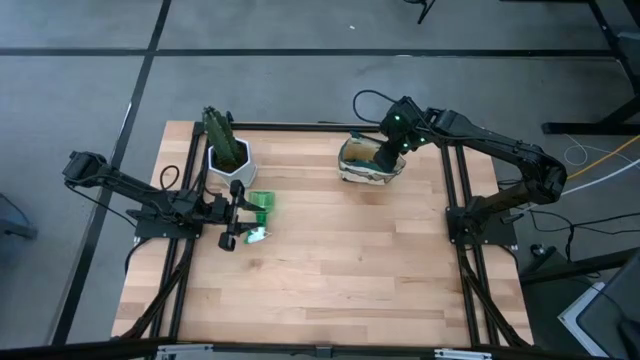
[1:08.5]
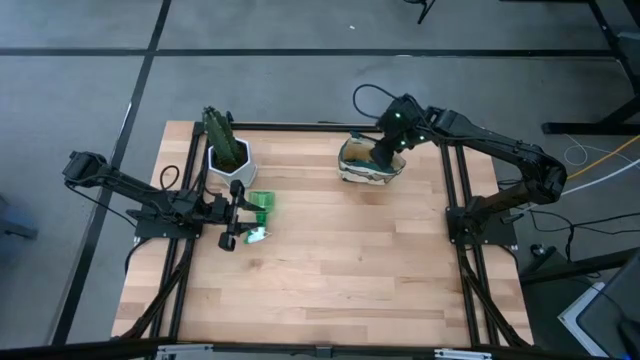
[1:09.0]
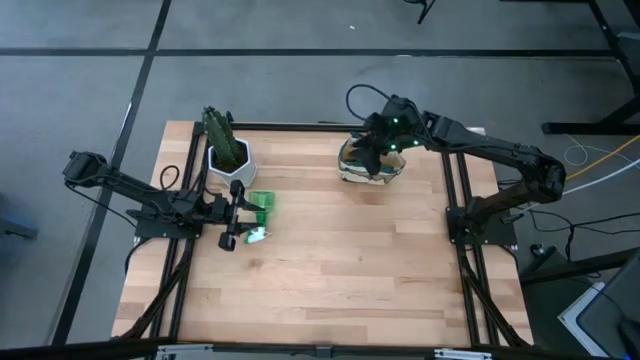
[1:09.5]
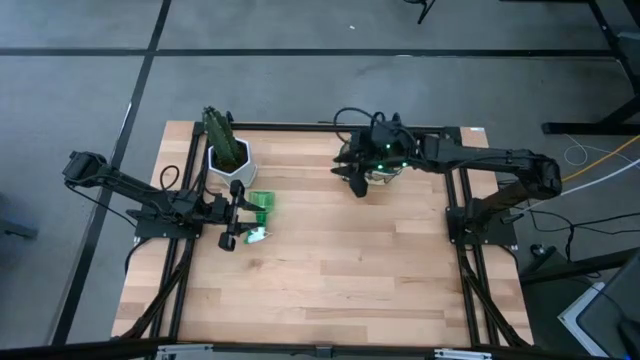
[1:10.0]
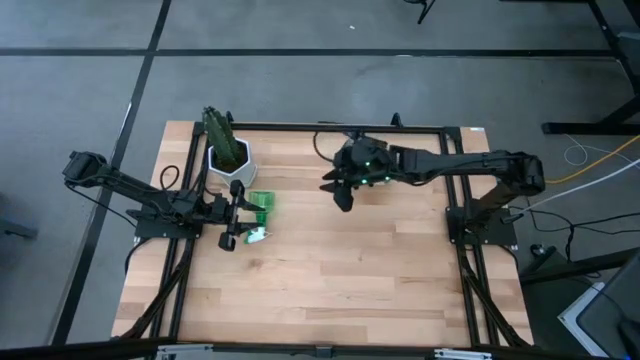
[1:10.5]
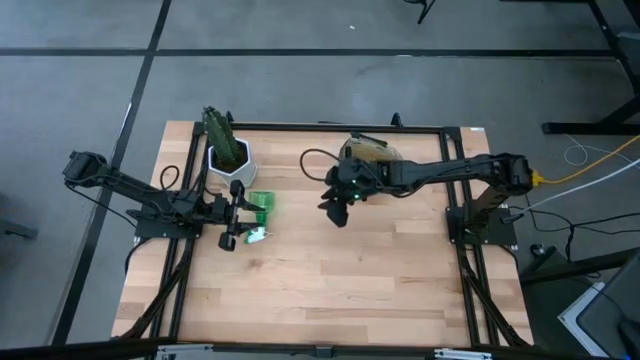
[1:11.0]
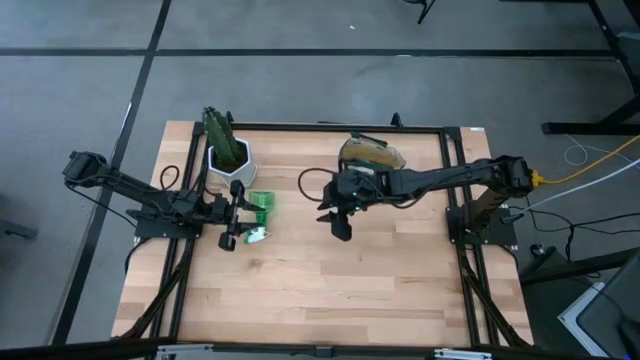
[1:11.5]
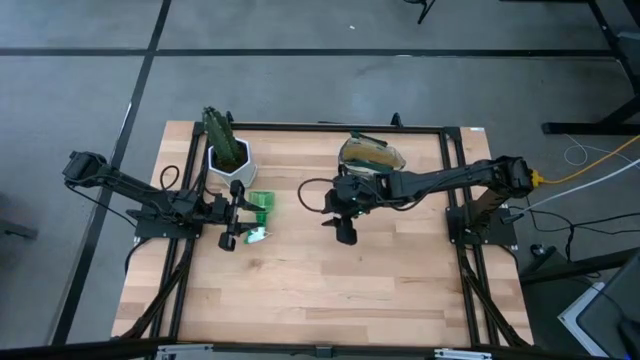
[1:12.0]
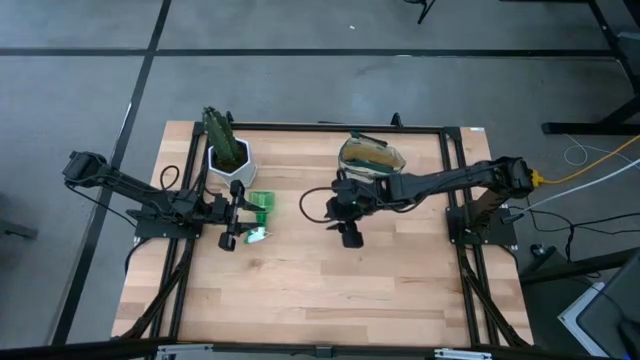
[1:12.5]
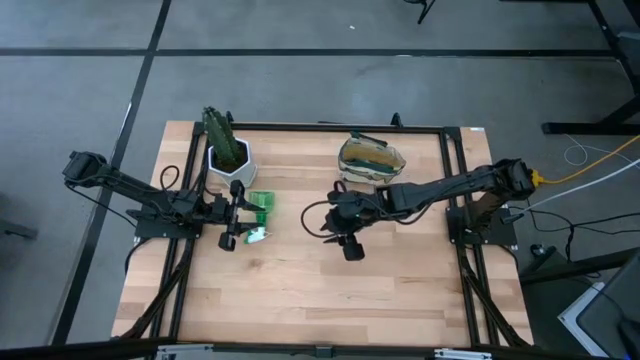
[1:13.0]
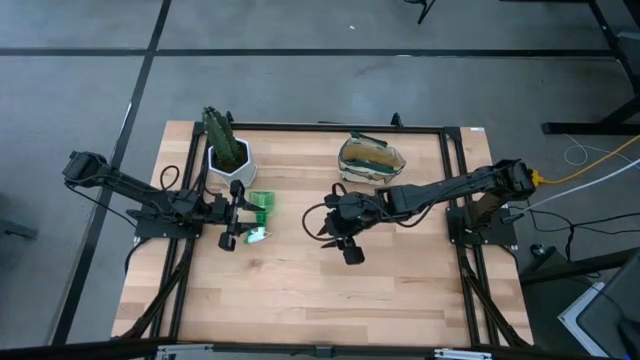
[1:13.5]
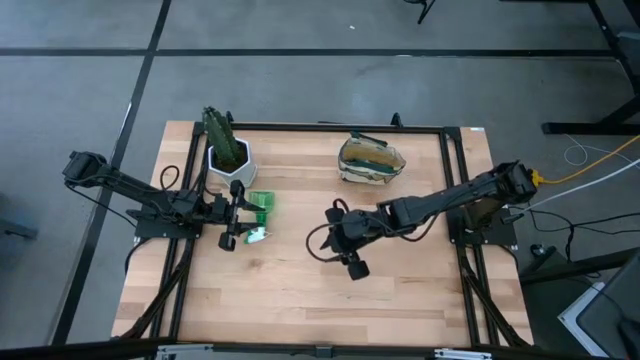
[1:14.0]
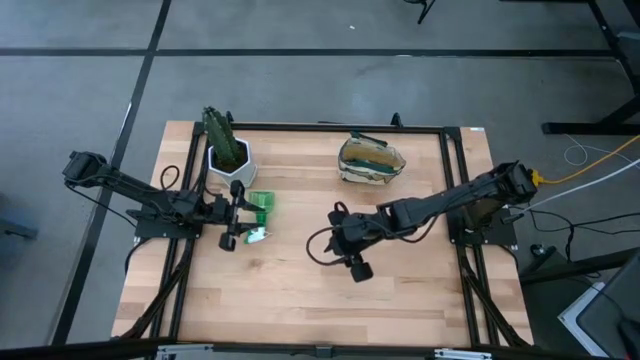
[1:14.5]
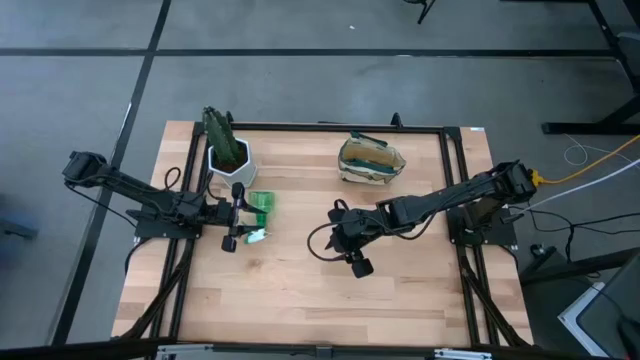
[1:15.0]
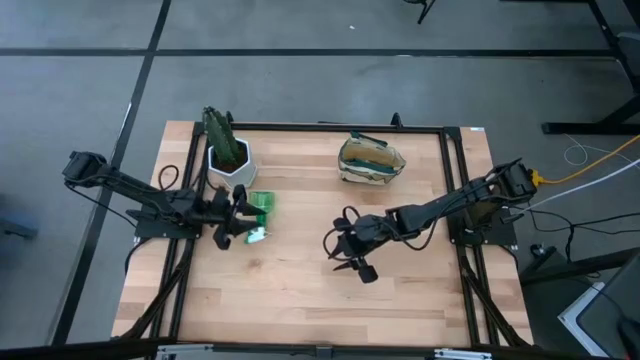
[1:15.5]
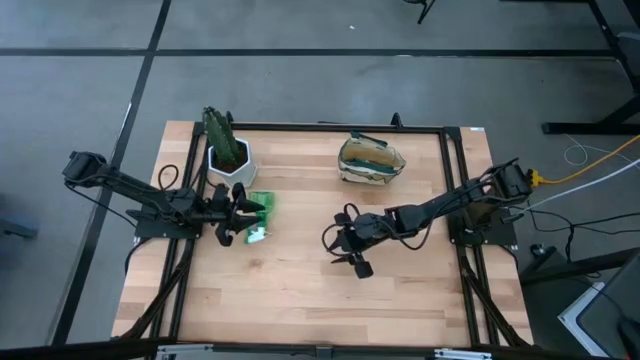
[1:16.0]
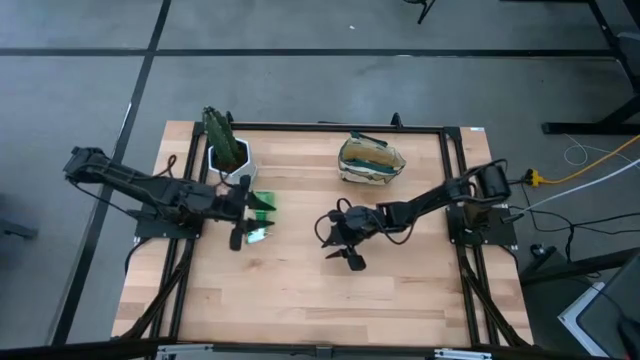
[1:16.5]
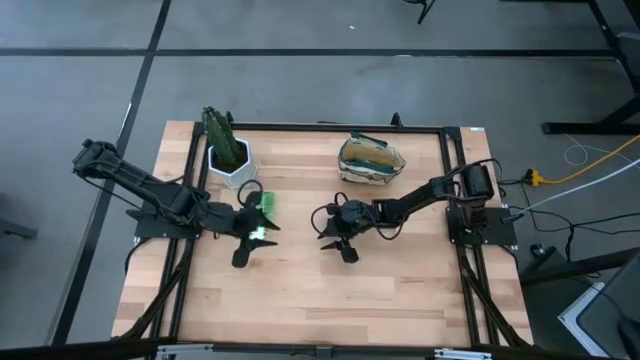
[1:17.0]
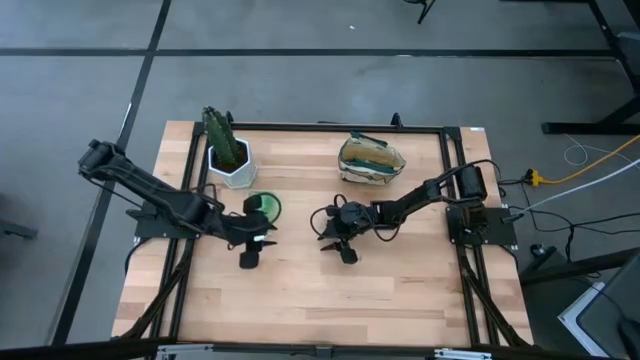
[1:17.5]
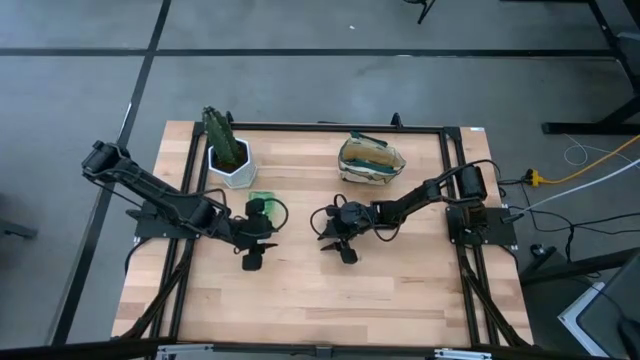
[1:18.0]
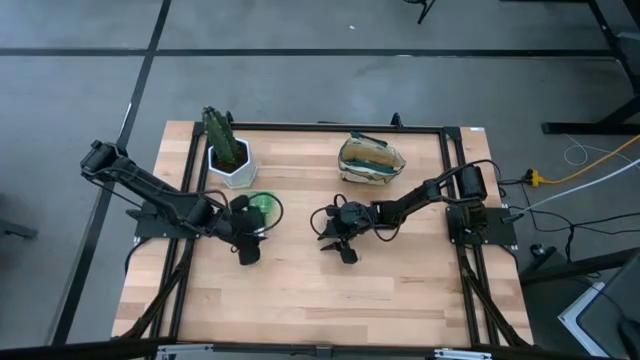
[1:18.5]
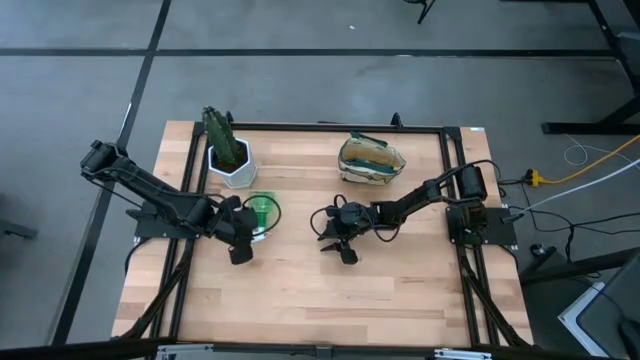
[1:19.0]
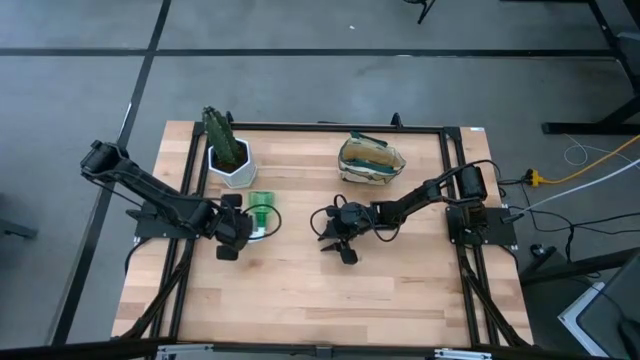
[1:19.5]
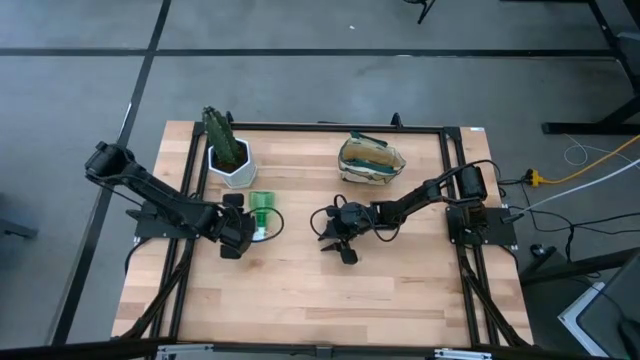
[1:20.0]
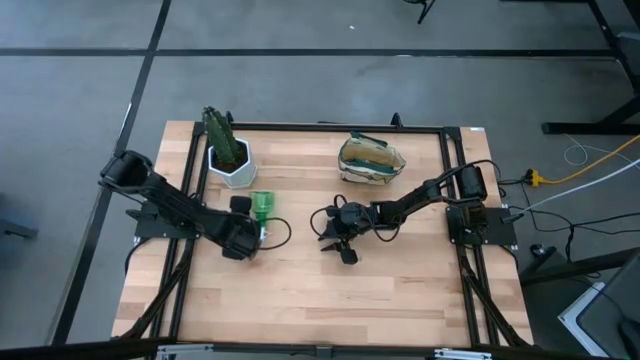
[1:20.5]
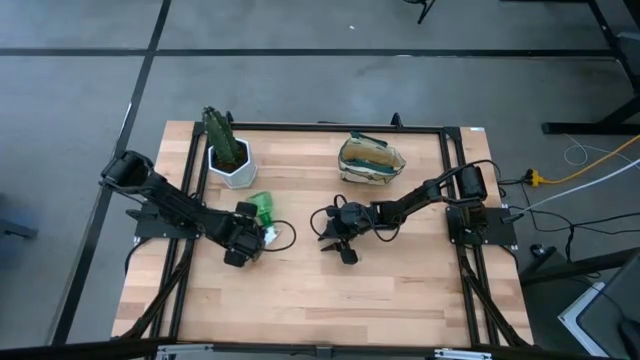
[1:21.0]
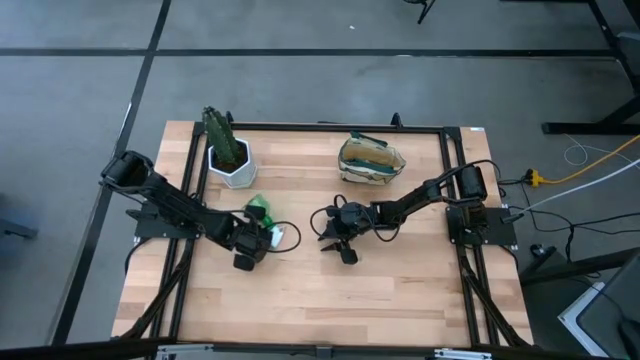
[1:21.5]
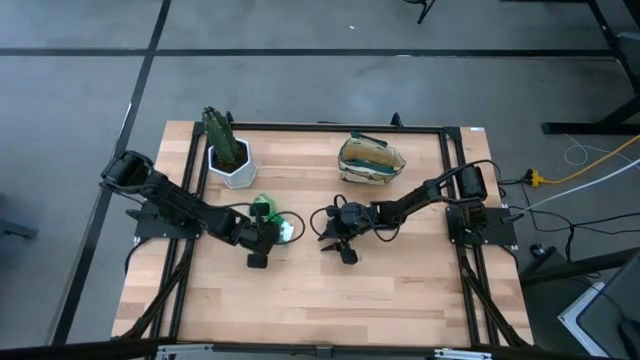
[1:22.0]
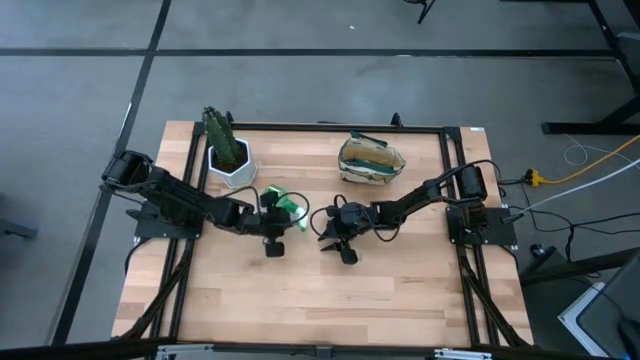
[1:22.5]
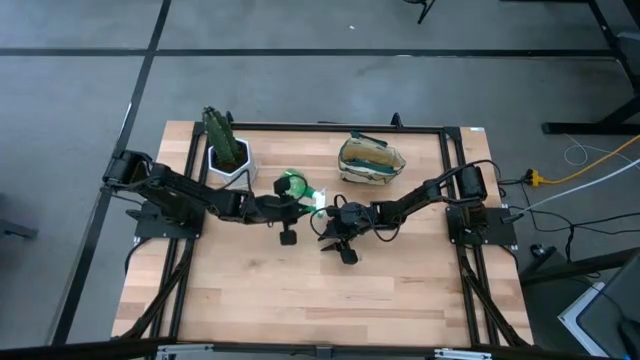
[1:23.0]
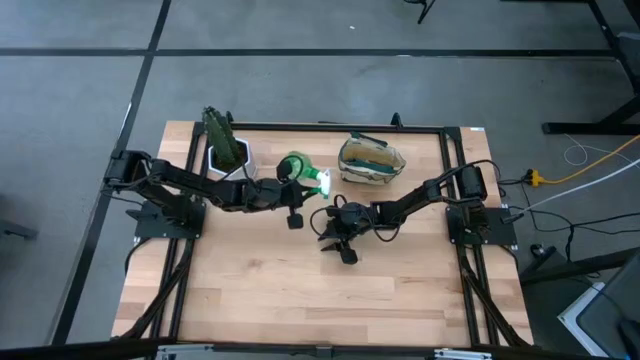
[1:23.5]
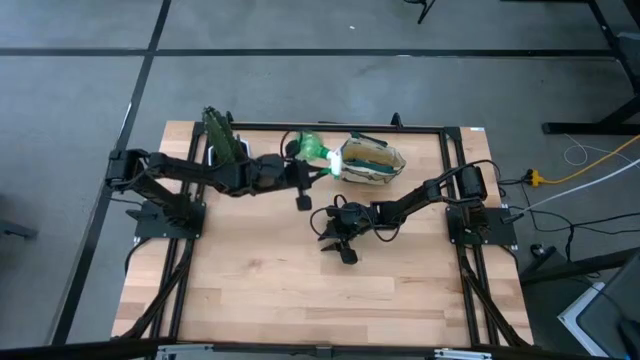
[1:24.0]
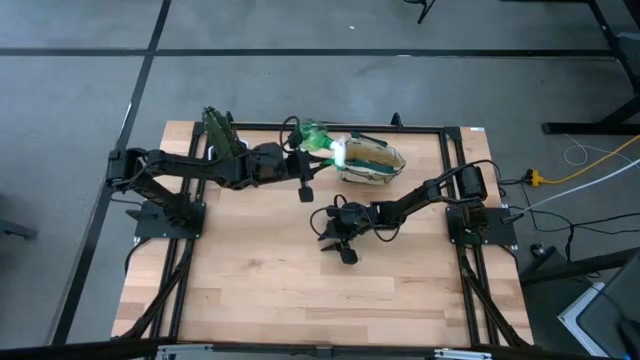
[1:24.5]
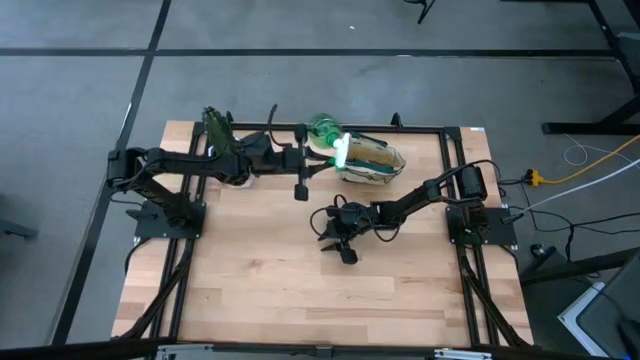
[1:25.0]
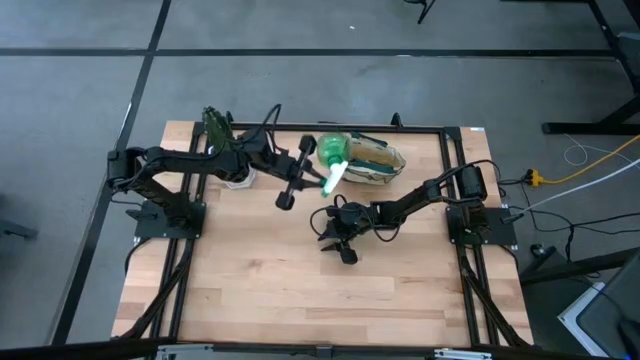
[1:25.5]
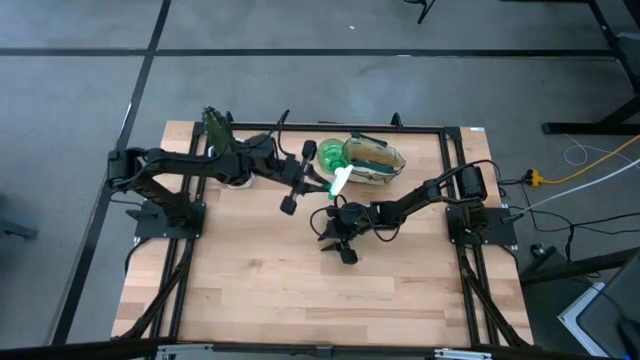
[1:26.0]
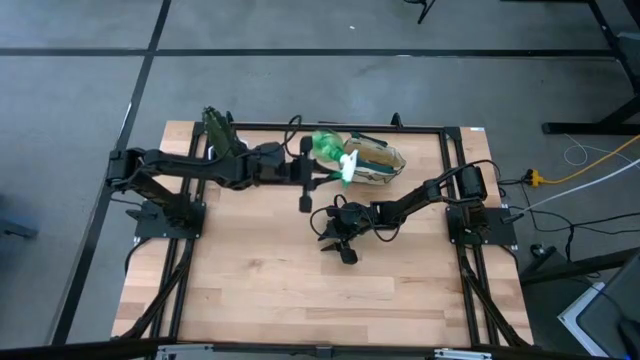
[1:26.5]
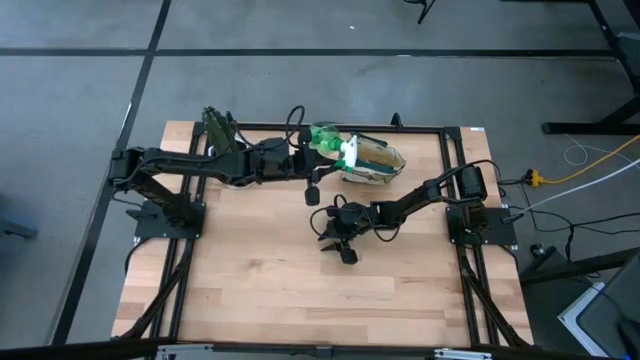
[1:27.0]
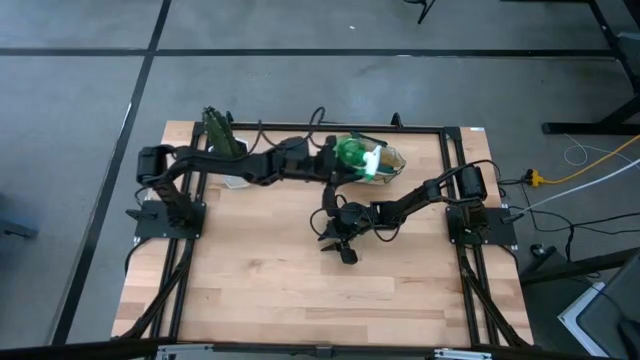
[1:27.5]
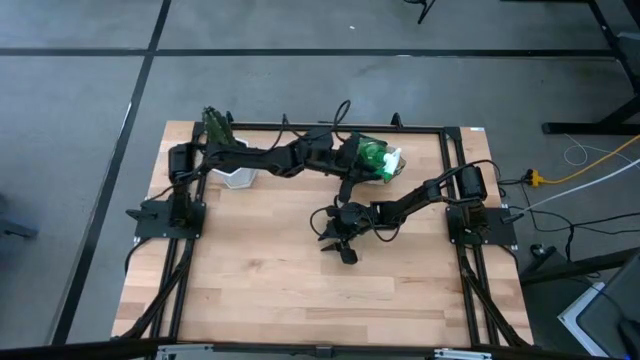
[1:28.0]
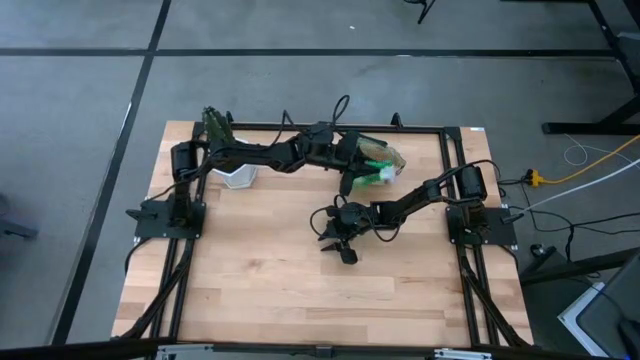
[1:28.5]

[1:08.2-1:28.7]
Task: Pick & Place Garden tools in Gardening bag
Put the green spray bottle into the brown gardening bag

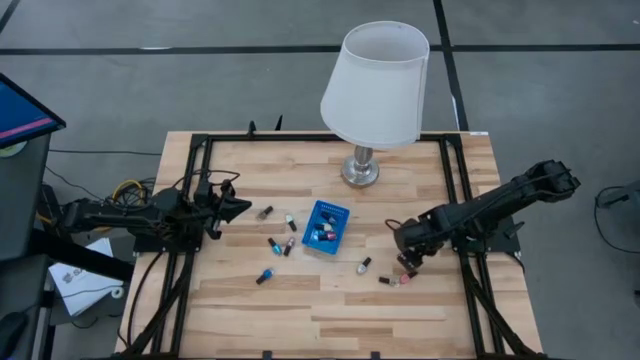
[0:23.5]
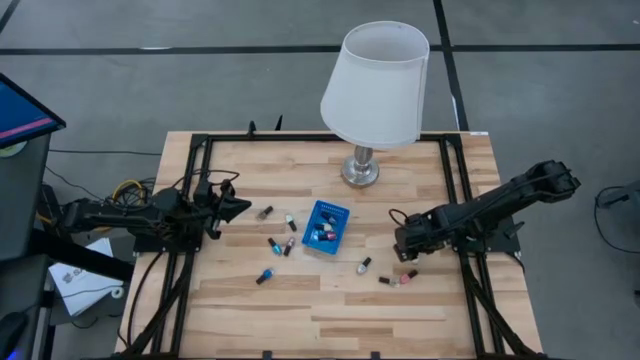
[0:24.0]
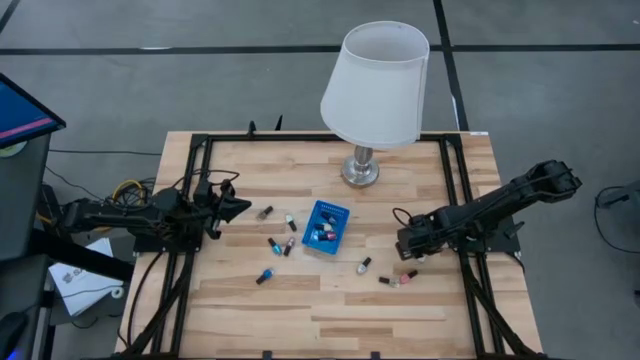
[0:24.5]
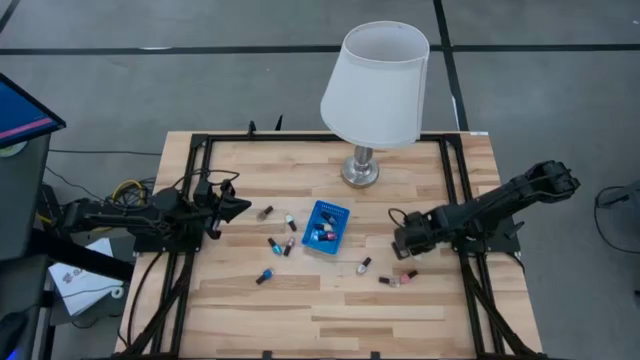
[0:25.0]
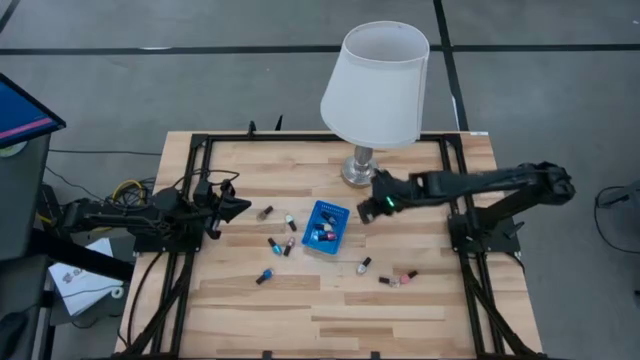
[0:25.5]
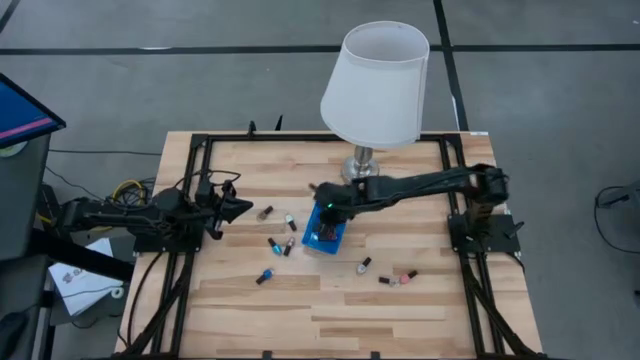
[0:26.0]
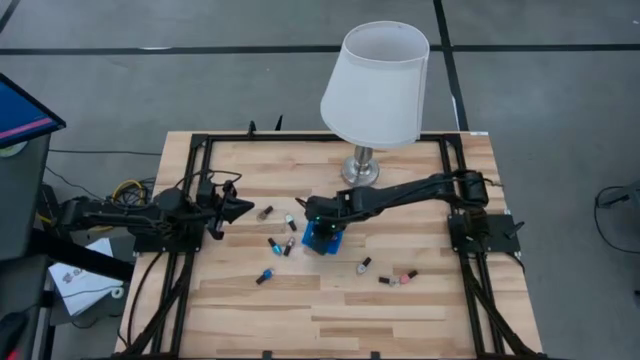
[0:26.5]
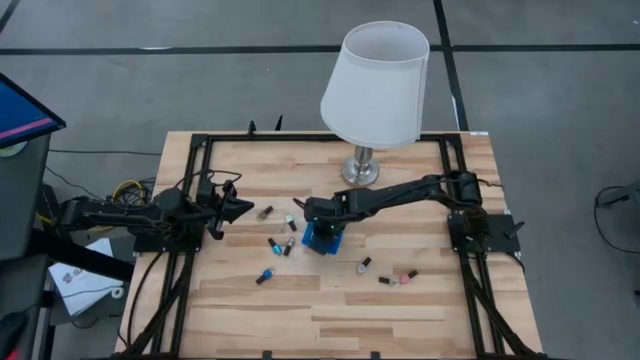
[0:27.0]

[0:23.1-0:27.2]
Task: Pick & Place Nail Polish
Put the right sky blue nail polish into the blue basket
